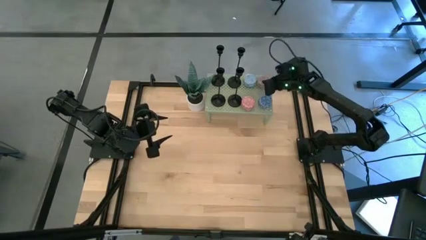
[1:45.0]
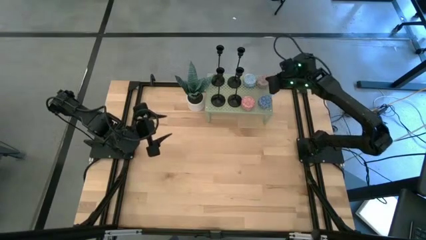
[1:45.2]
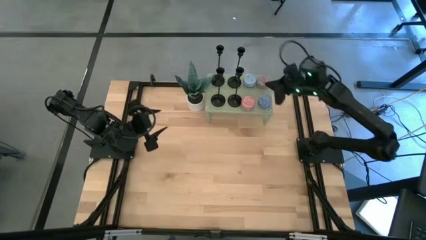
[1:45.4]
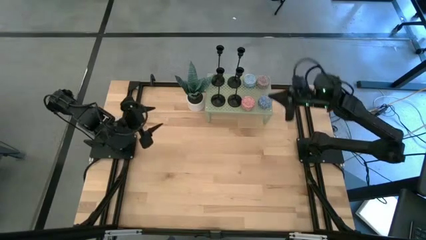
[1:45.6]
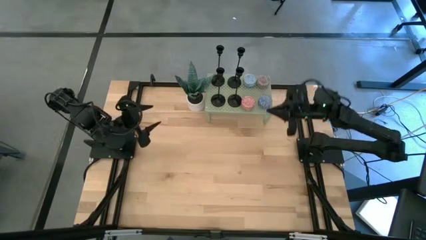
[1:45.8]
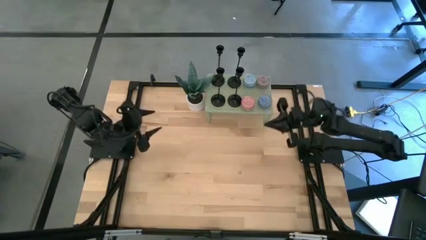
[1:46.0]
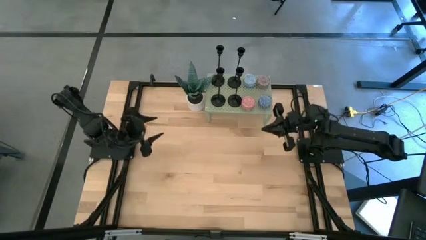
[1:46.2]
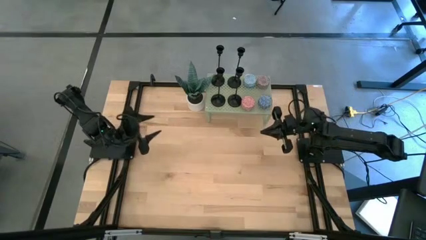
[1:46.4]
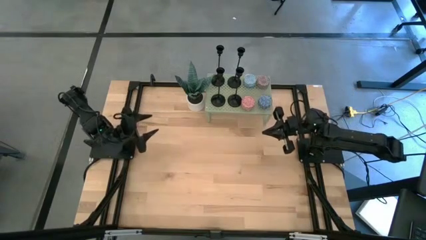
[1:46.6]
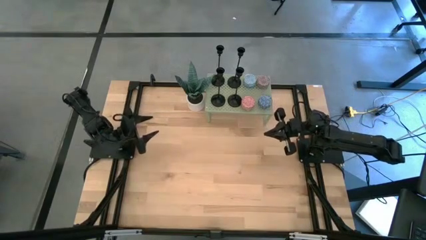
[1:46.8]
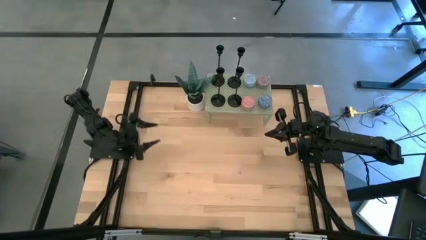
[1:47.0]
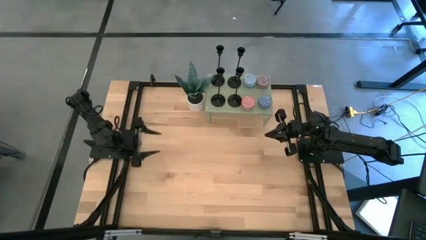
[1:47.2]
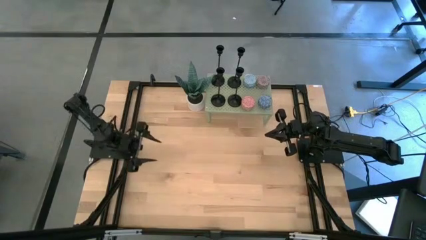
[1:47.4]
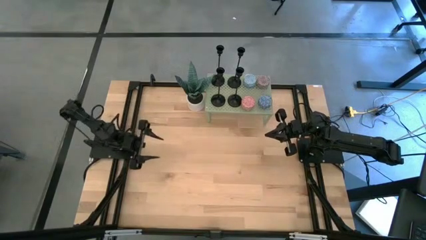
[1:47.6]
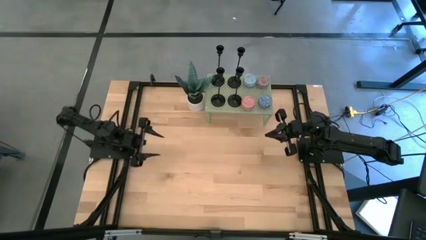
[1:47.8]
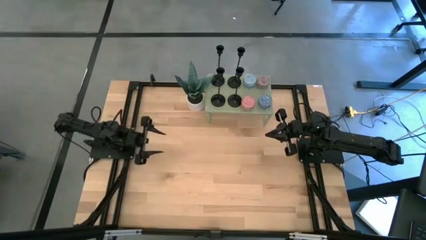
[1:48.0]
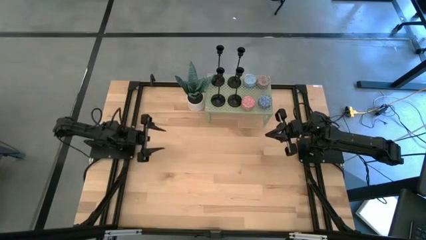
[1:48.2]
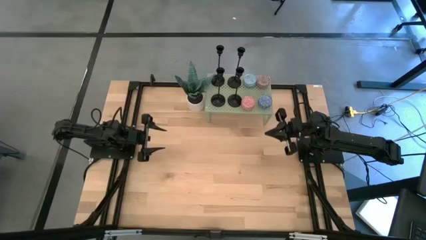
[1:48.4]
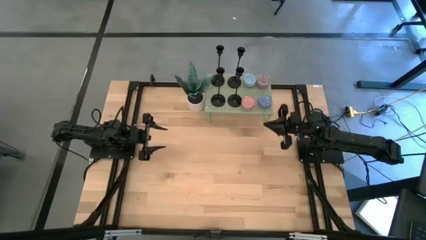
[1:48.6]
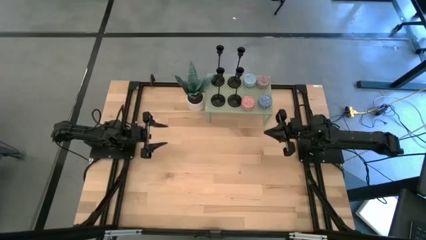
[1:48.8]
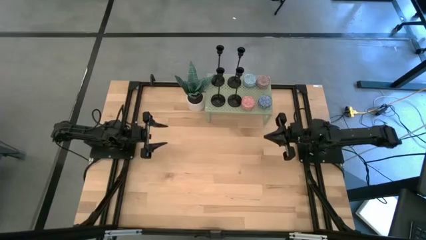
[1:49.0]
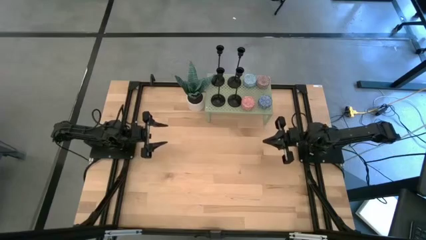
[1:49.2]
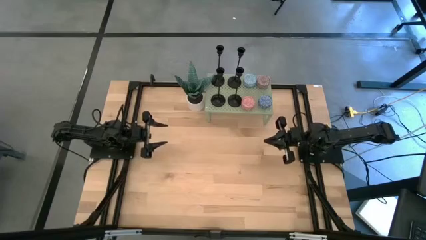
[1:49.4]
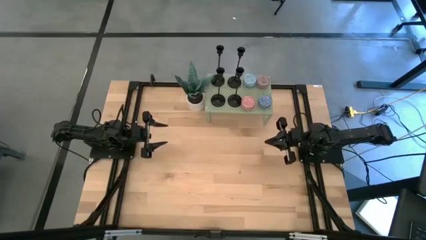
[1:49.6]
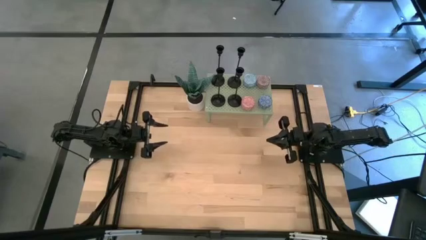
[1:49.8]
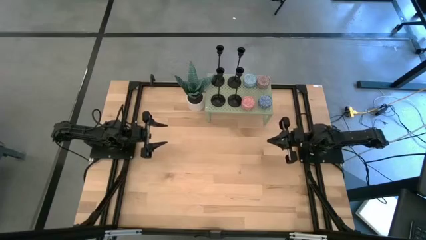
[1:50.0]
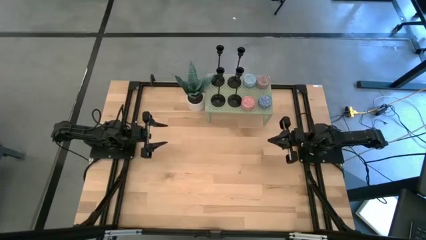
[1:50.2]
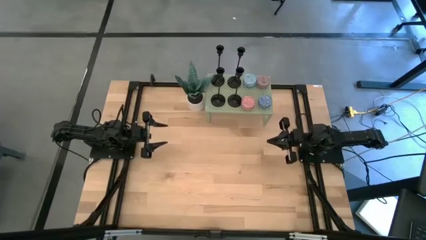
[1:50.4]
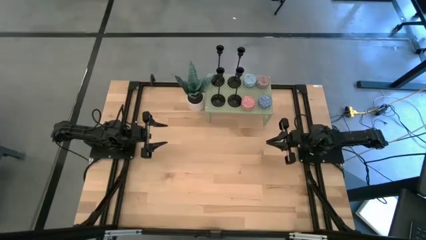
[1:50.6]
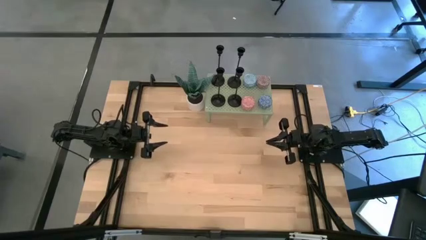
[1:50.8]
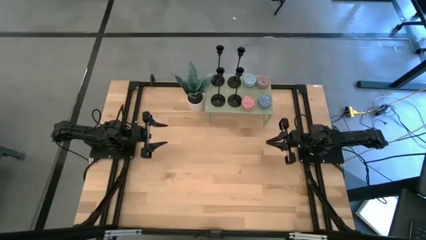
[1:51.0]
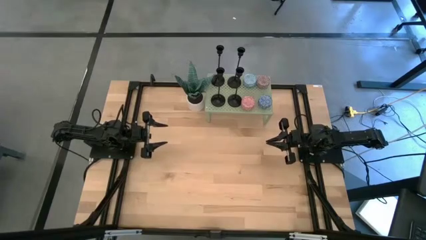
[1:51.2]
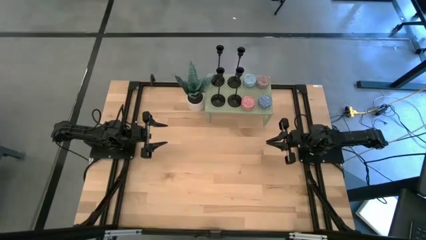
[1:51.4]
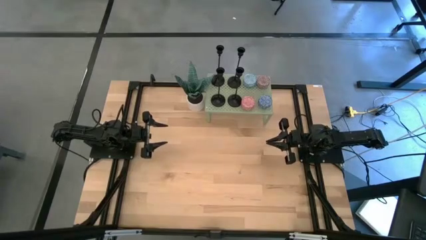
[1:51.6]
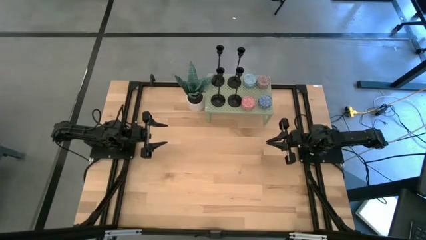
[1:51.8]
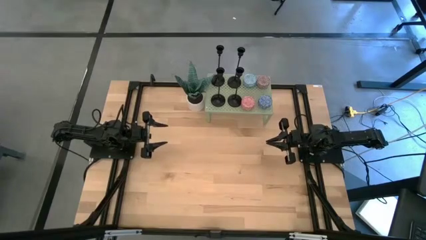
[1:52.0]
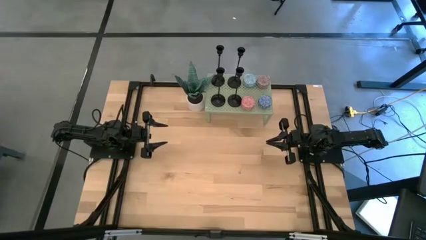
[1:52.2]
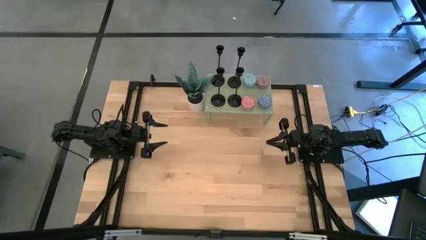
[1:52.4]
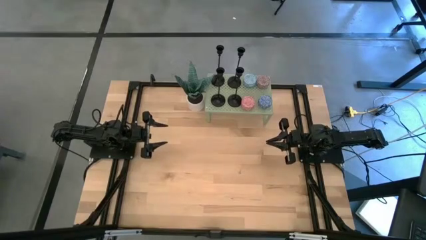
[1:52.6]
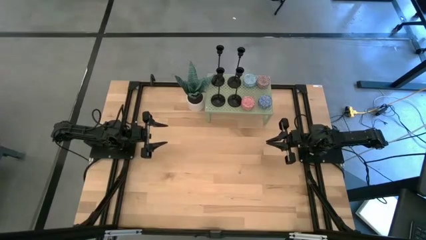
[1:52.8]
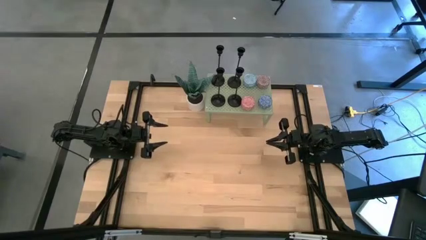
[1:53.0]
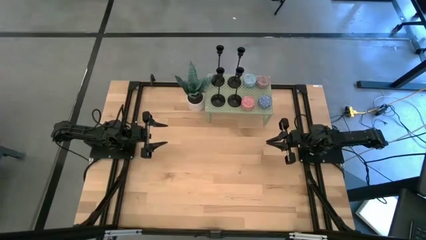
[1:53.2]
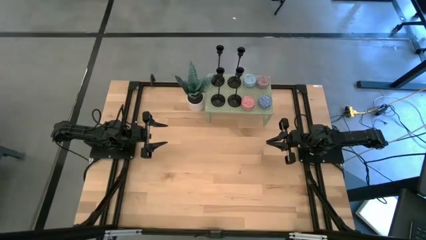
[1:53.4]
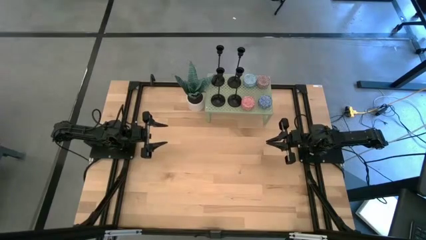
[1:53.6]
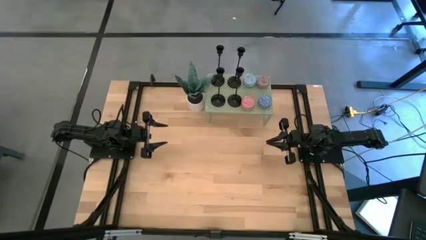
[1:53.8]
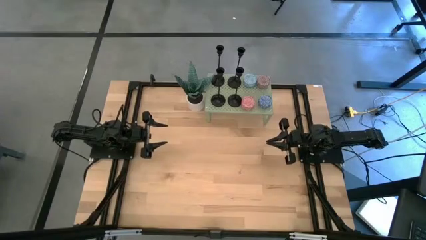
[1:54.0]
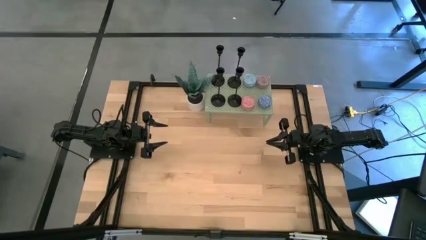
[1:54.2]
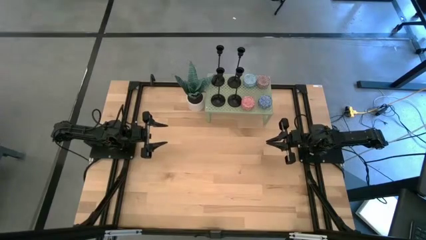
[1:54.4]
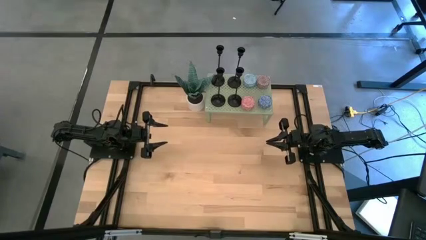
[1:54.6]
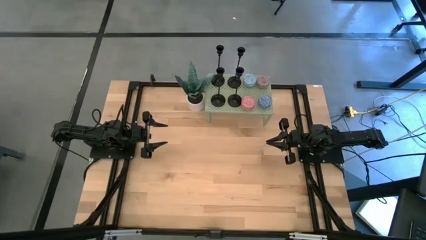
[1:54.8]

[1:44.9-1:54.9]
Task: Pick & Place candle stick holders
Return to Home Position
